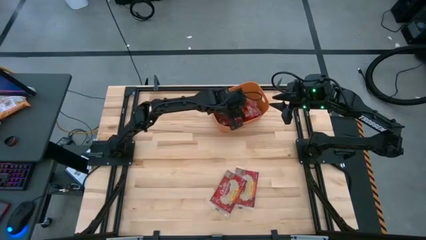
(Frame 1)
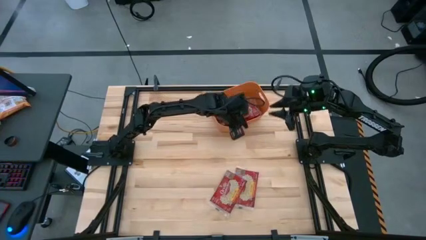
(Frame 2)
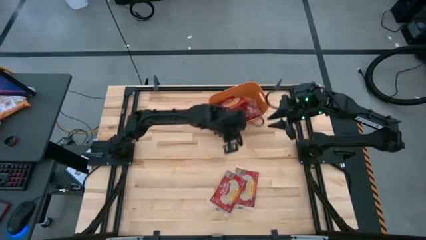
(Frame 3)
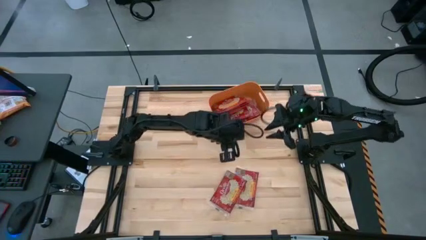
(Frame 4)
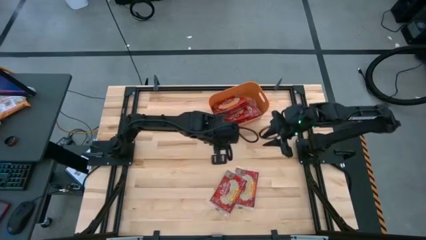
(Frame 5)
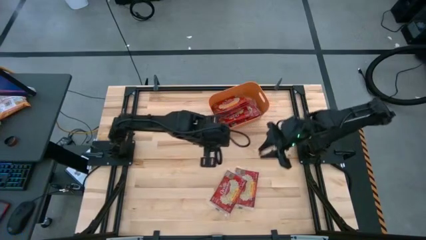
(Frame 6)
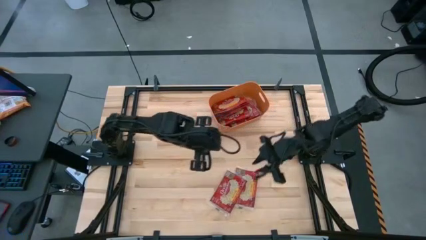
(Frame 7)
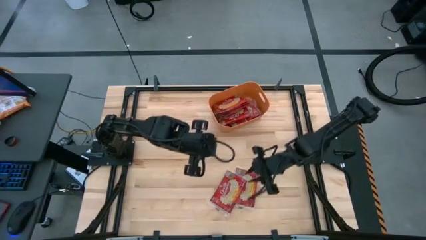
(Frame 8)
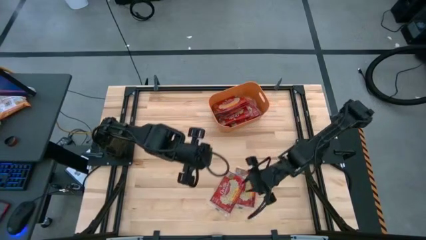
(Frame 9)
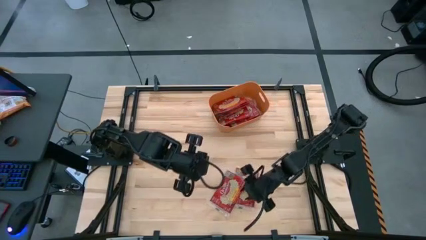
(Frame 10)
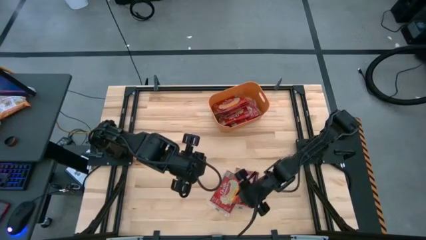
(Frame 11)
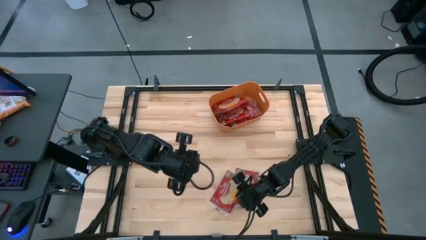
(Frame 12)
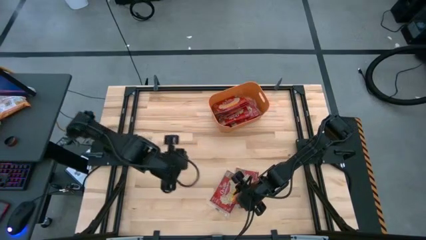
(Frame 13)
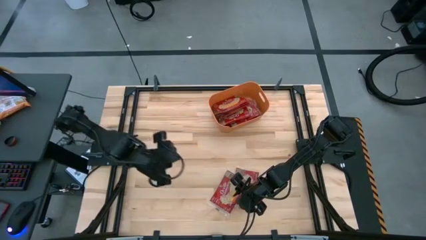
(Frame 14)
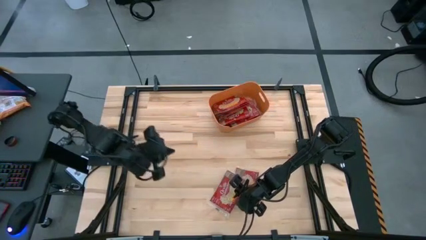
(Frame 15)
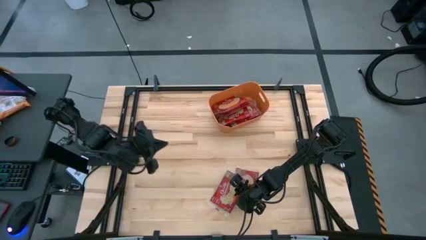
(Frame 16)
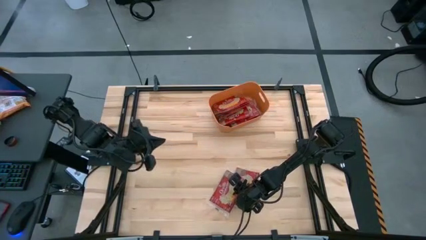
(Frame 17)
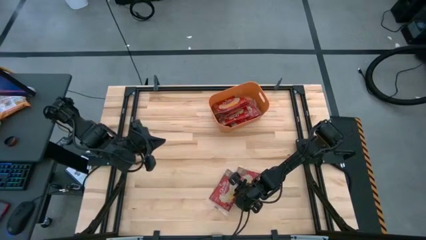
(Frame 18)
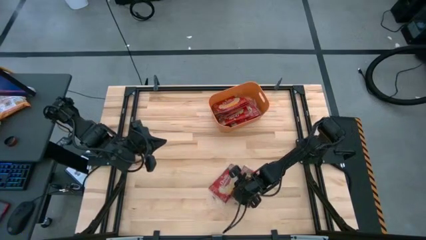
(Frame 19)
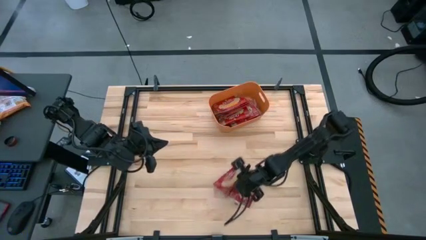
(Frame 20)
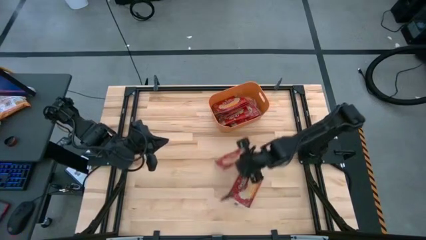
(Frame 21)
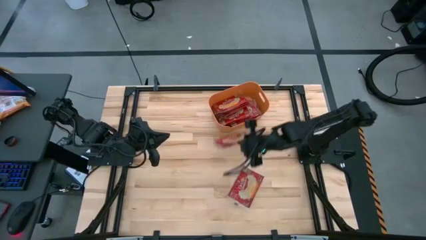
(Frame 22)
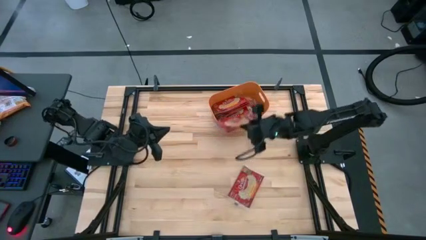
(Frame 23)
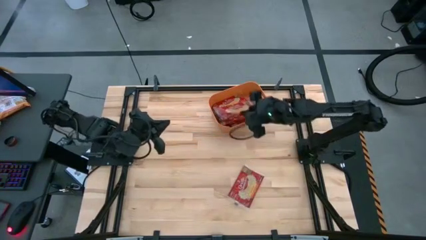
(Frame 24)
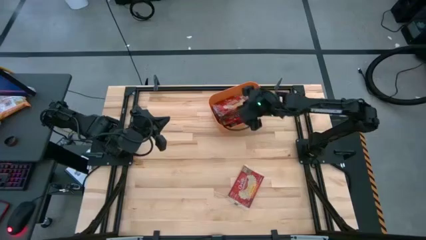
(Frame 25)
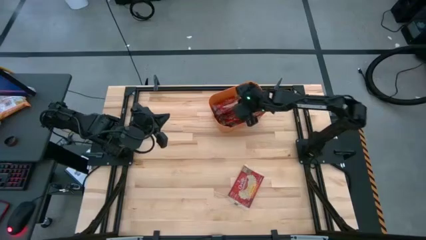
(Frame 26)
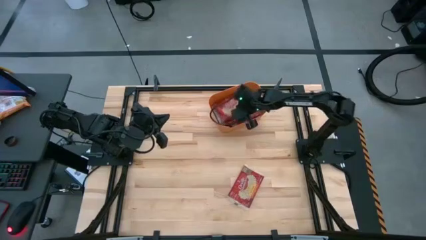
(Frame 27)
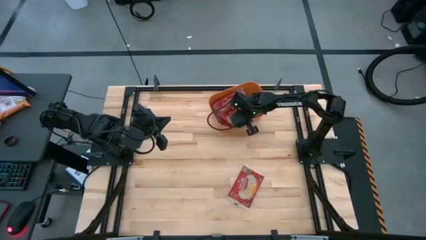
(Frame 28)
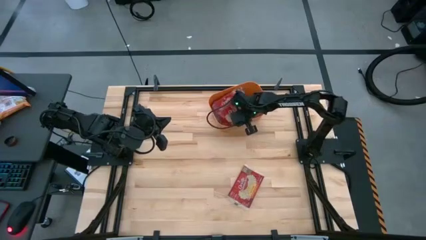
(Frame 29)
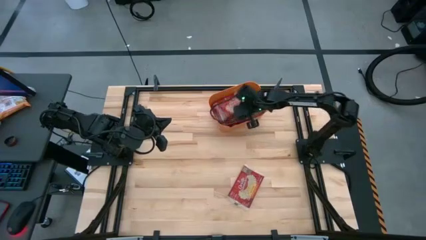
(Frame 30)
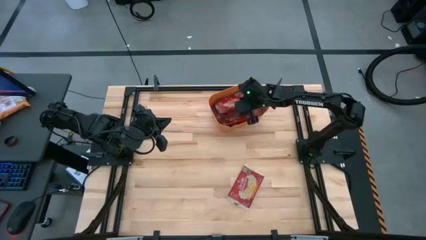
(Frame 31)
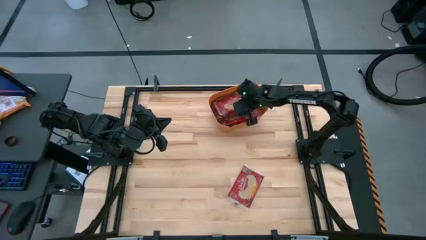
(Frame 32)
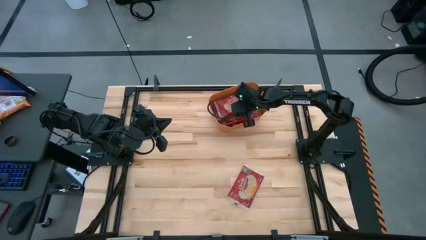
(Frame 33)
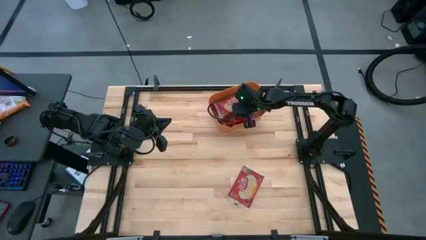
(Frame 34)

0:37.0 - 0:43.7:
Task: Sort popcorn bags into baskets
Put the red popcorn bag into the orange bin

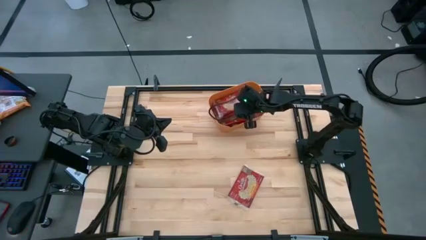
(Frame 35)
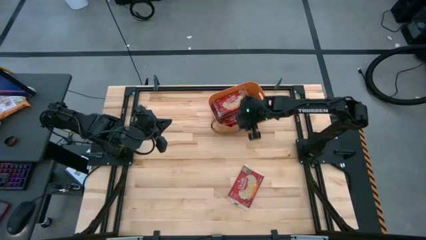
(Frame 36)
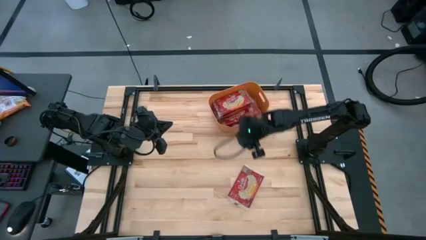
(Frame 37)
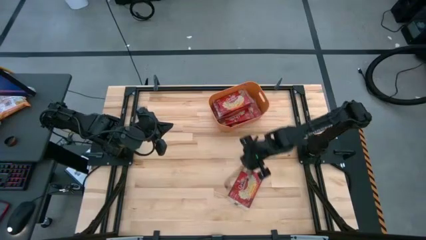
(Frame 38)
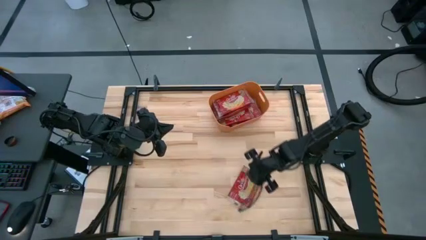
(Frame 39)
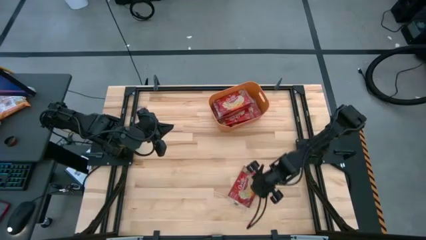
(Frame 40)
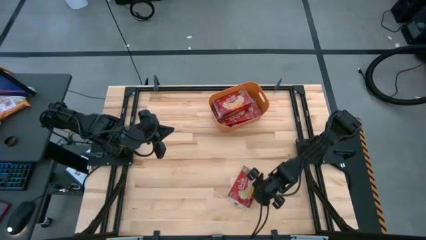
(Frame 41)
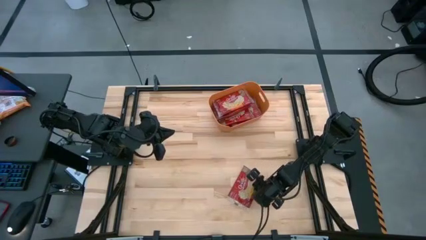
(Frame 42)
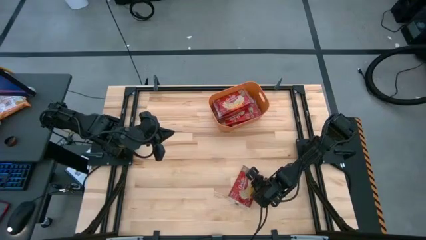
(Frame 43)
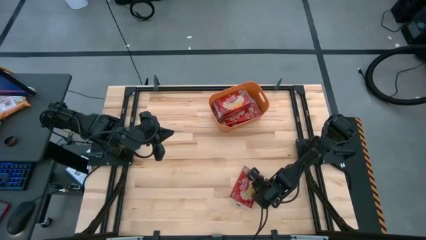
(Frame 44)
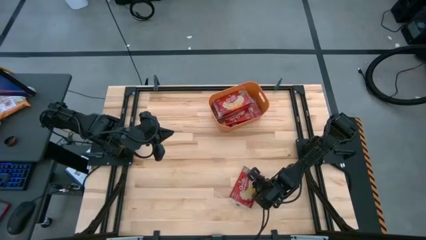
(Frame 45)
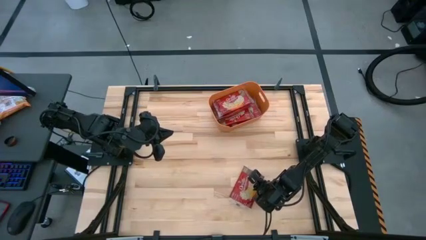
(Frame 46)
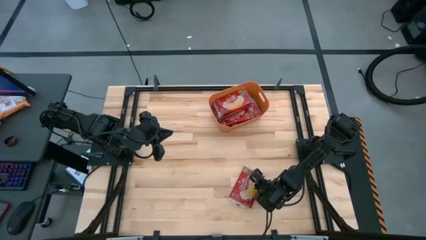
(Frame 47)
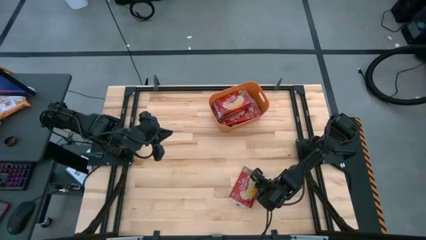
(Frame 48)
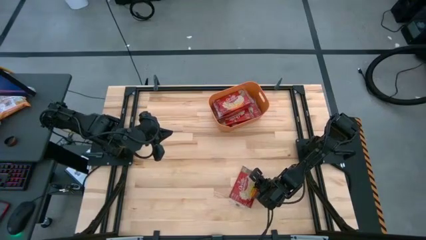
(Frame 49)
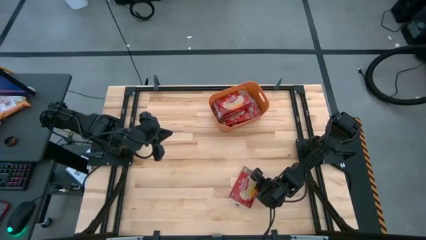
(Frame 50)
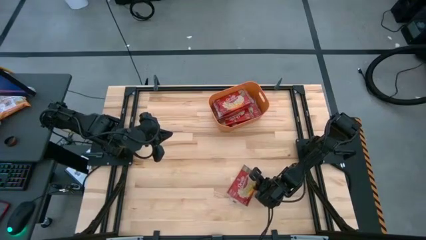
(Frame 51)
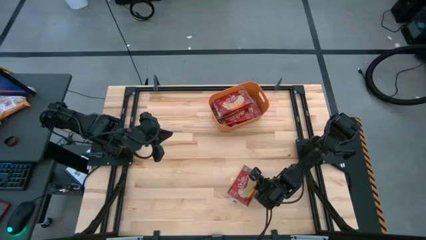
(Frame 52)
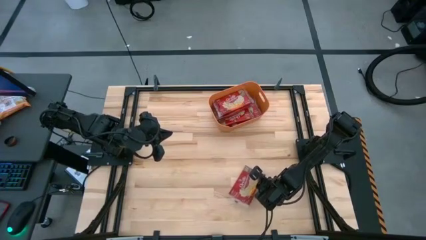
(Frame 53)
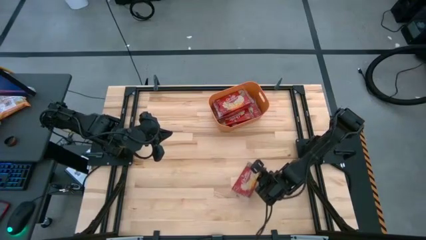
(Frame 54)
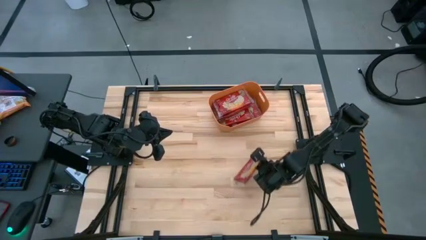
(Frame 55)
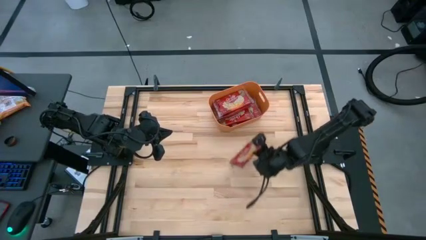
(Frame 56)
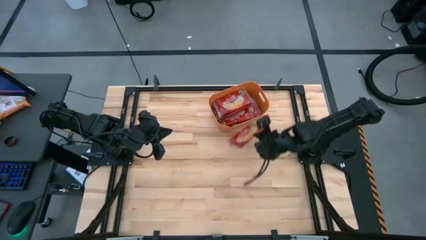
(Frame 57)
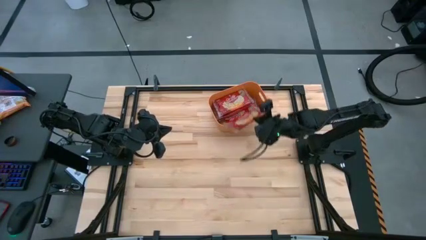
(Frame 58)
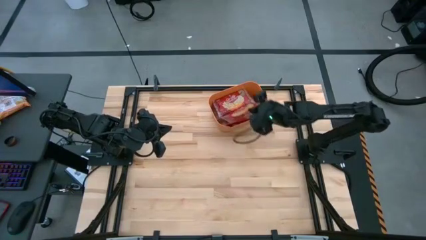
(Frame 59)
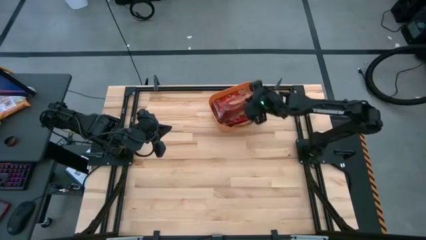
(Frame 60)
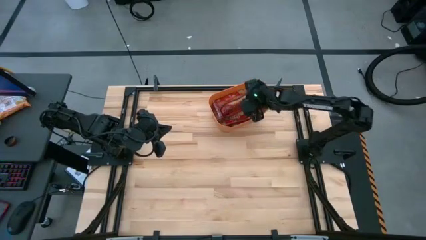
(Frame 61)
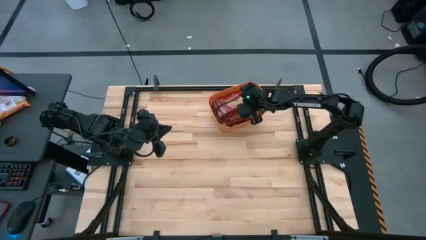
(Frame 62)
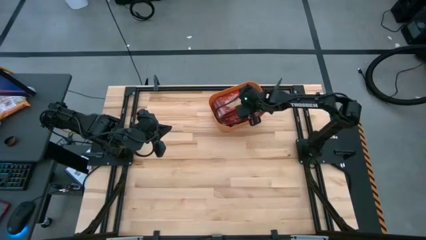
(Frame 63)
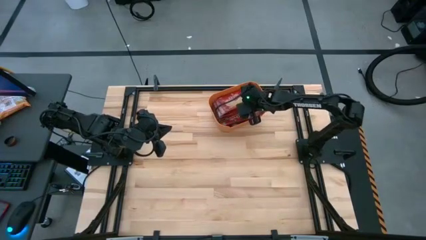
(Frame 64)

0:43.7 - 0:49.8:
Put the red popcorn bag into the orange bin

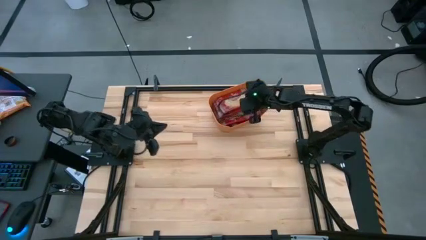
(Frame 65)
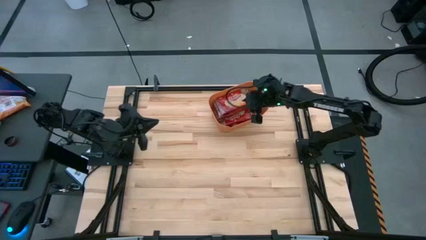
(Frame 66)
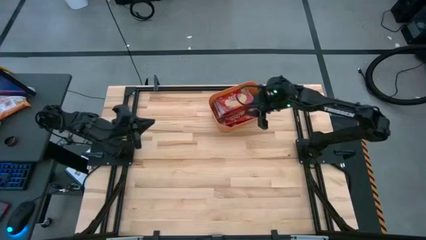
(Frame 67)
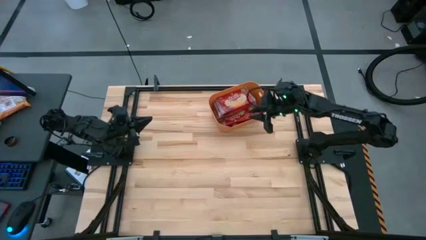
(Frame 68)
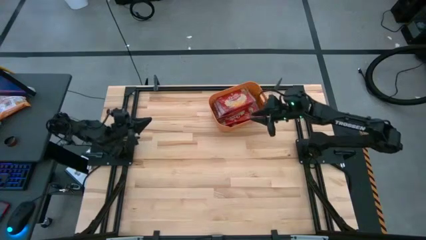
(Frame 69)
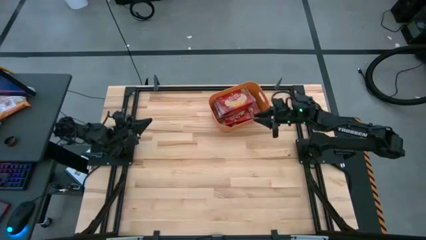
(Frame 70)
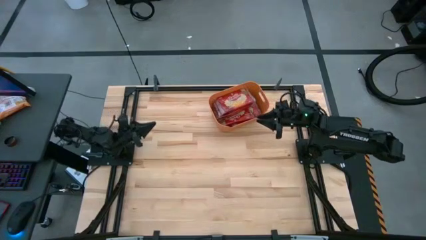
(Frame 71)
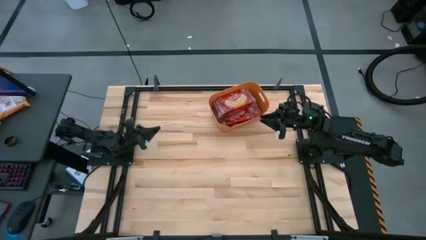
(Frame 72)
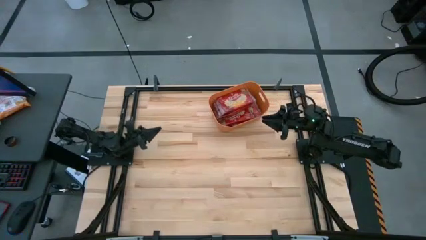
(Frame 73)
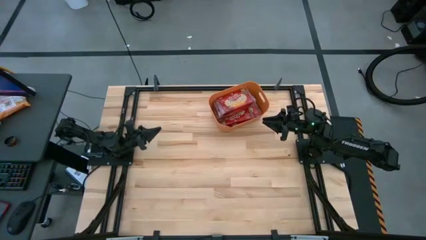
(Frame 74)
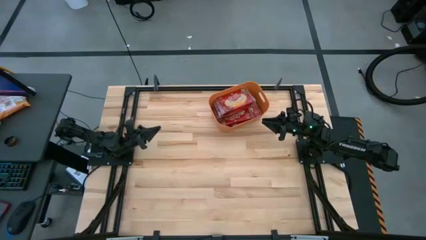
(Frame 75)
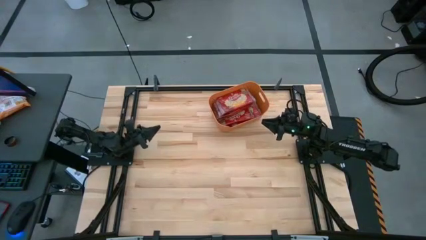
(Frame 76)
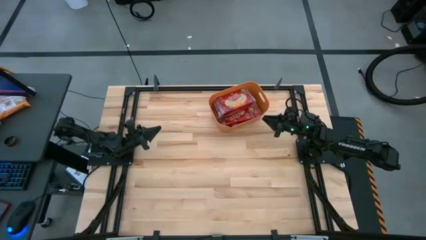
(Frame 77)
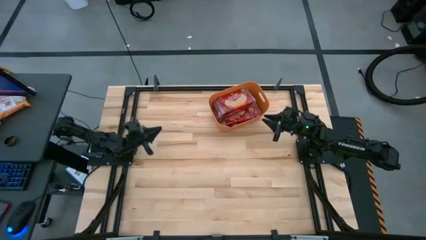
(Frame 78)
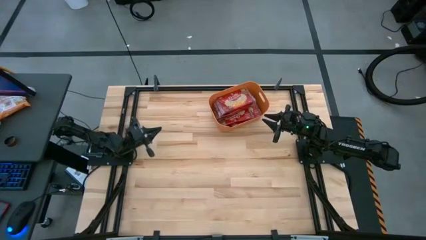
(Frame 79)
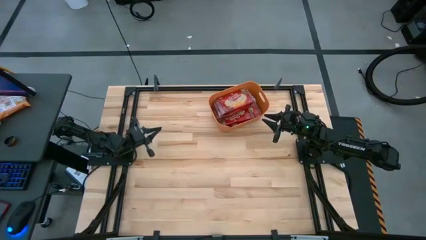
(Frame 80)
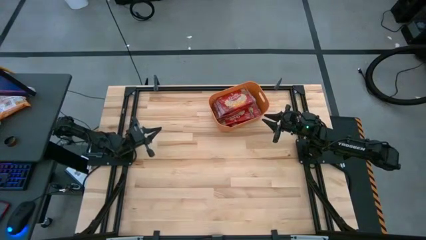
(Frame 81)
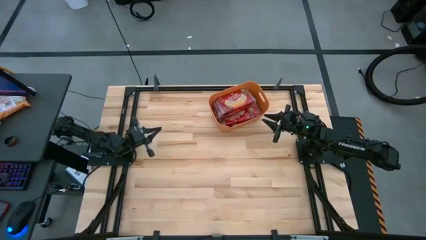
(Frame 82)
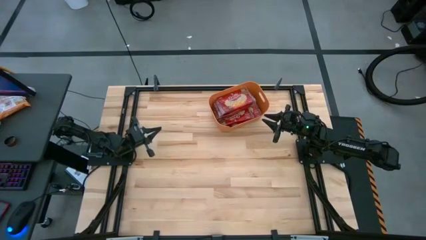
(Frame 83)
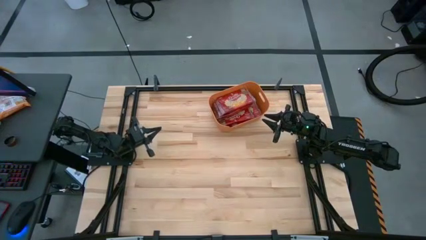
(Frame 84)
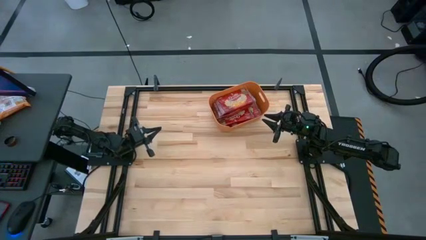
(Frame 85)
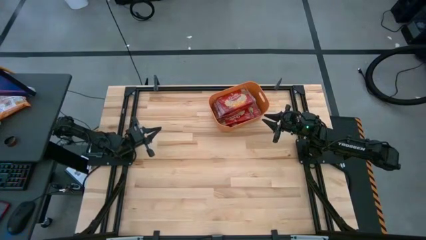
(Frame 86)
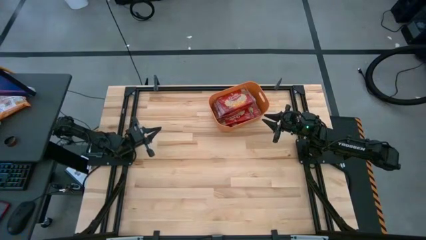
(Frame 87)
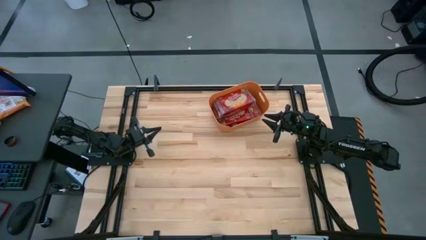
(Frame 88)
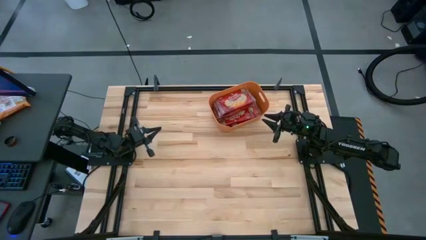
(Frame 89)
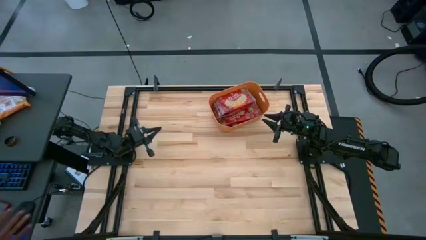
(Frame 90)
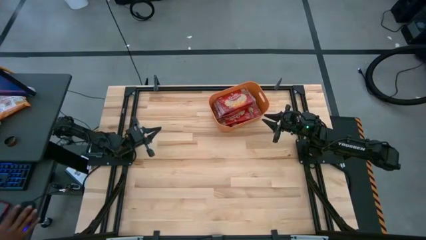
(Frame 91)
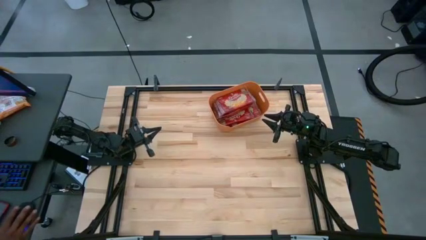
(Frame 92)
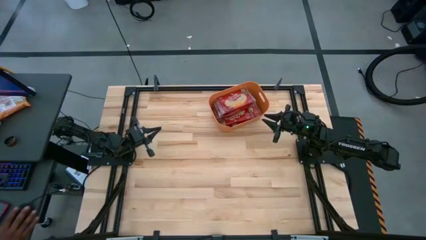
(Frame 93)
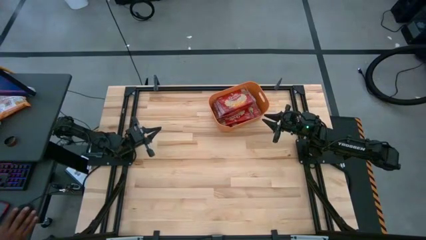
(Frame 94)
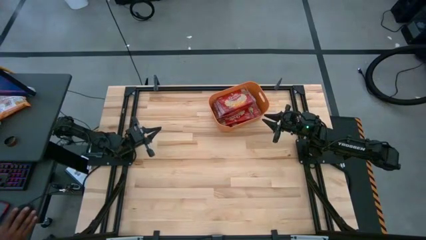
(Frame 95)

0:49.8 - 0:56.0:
Return to Home Position
